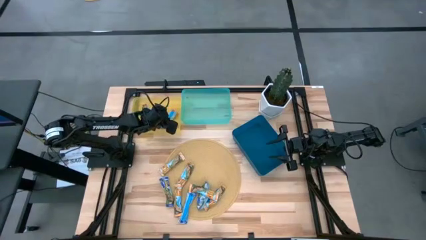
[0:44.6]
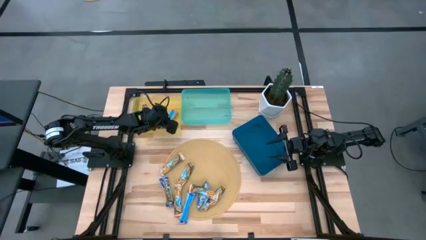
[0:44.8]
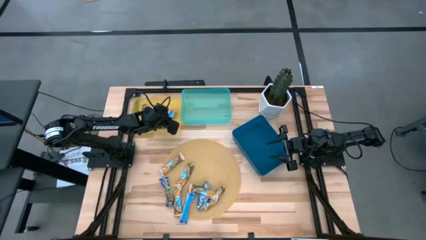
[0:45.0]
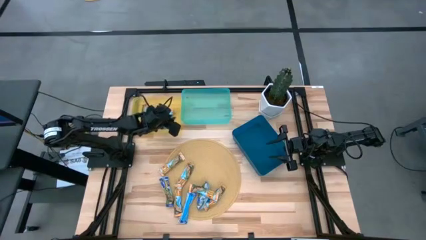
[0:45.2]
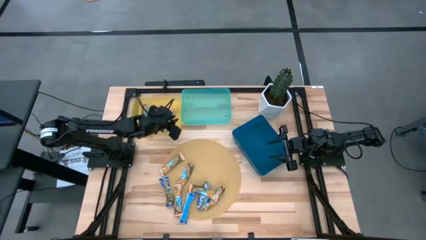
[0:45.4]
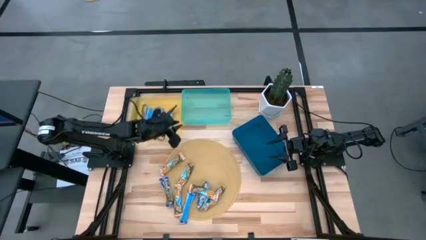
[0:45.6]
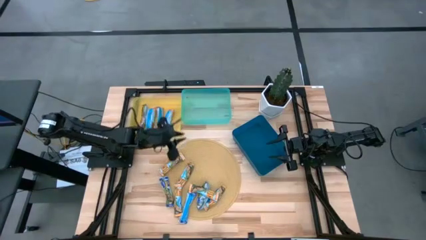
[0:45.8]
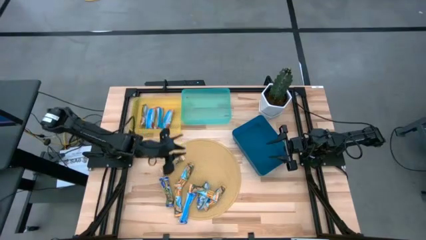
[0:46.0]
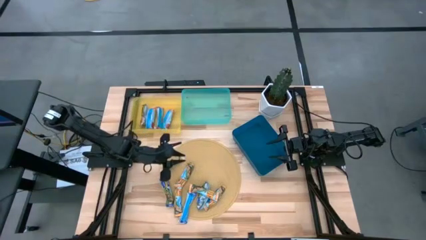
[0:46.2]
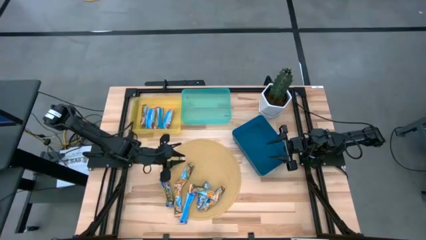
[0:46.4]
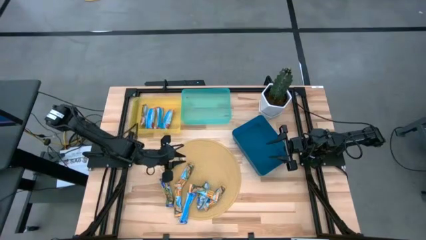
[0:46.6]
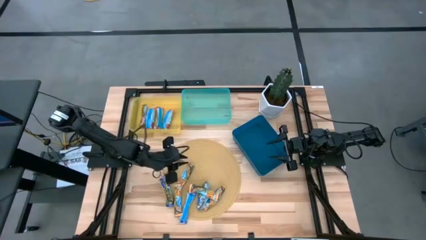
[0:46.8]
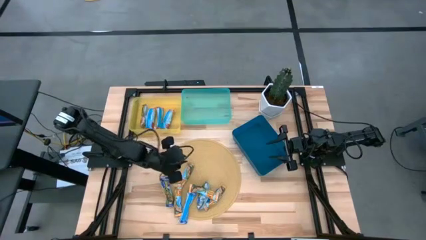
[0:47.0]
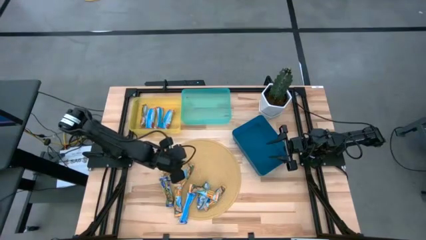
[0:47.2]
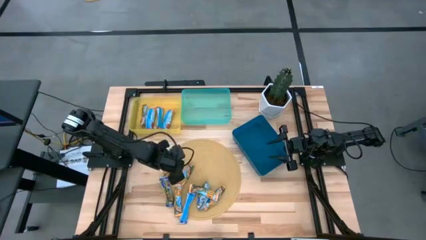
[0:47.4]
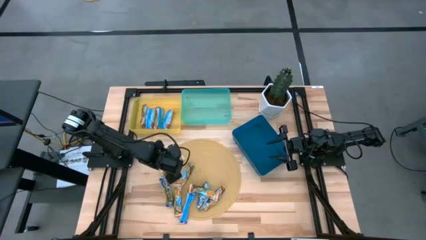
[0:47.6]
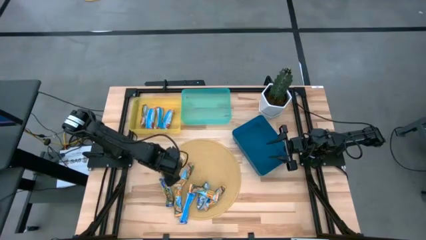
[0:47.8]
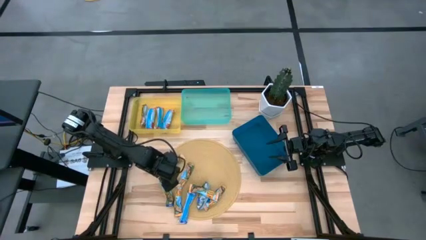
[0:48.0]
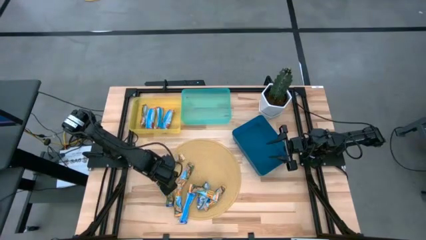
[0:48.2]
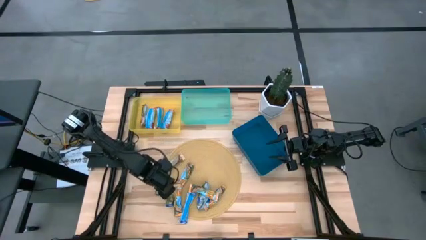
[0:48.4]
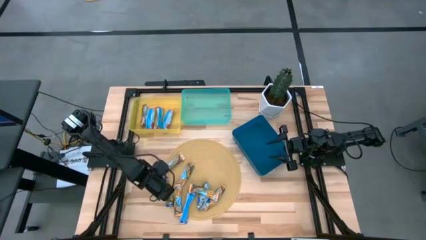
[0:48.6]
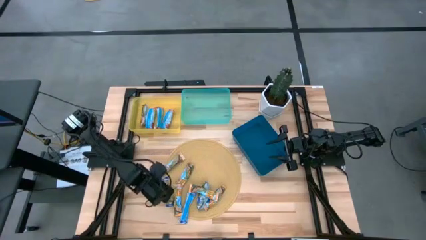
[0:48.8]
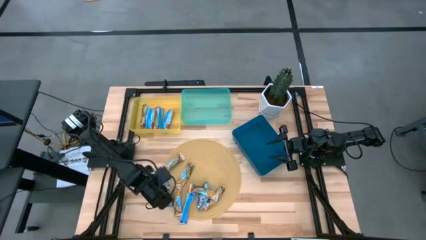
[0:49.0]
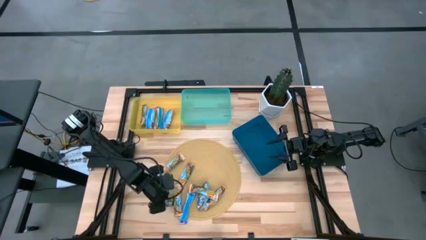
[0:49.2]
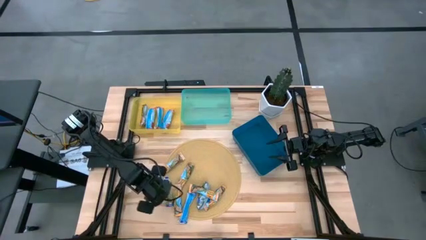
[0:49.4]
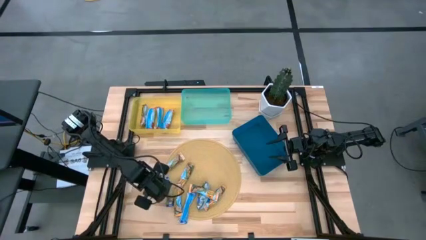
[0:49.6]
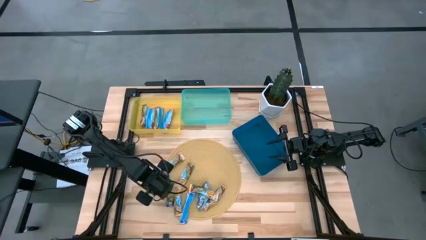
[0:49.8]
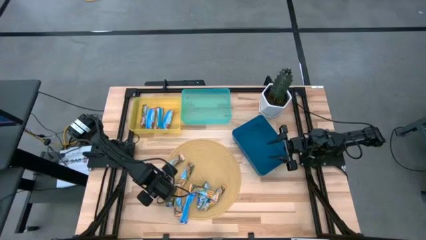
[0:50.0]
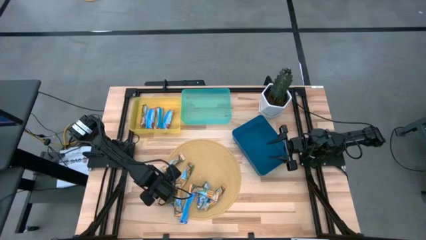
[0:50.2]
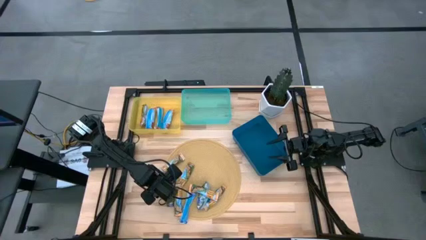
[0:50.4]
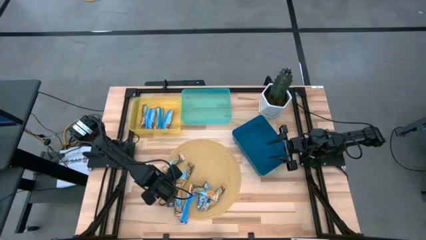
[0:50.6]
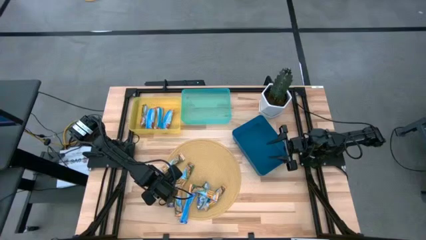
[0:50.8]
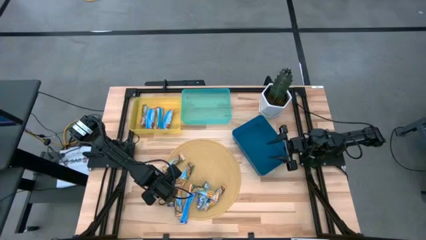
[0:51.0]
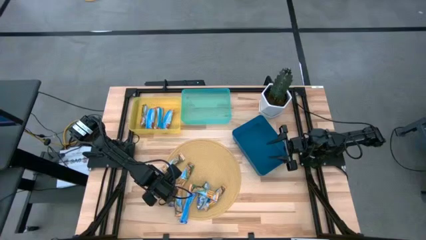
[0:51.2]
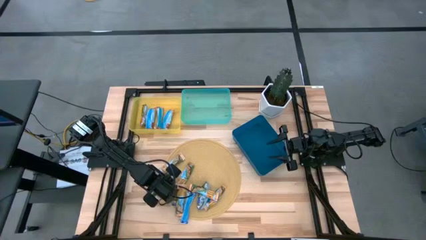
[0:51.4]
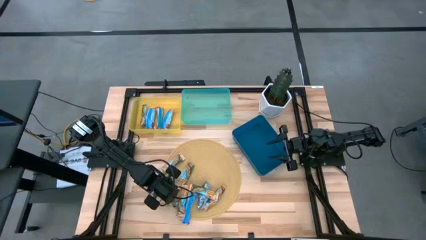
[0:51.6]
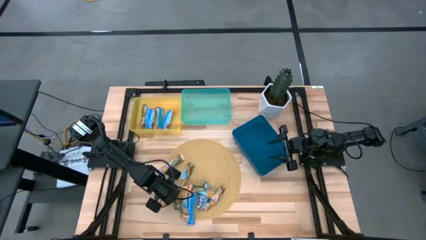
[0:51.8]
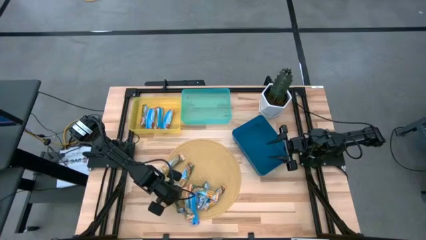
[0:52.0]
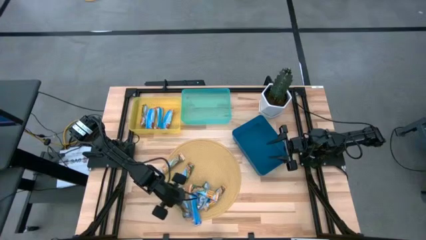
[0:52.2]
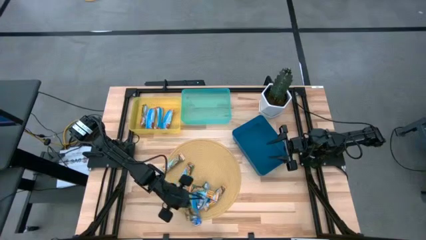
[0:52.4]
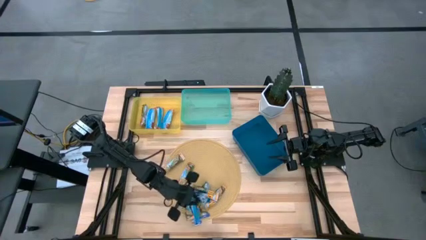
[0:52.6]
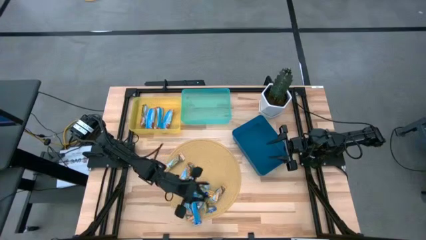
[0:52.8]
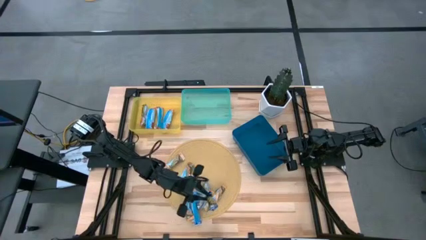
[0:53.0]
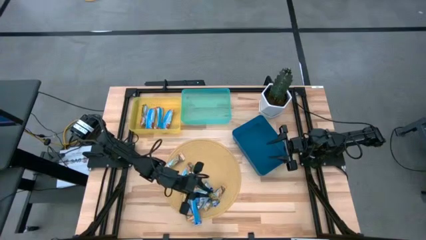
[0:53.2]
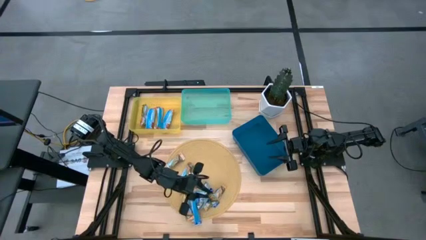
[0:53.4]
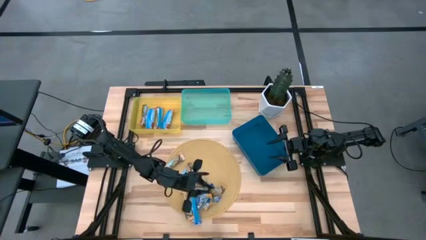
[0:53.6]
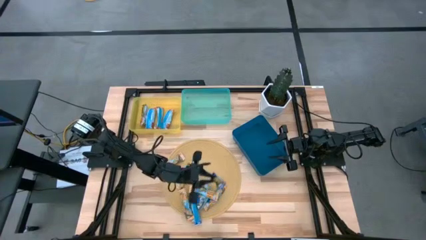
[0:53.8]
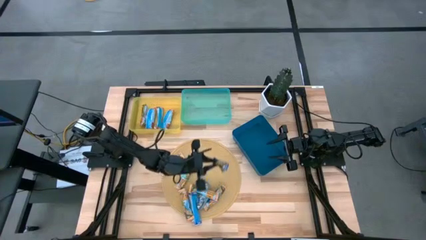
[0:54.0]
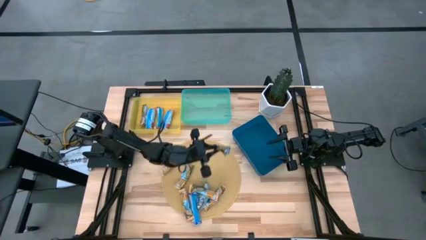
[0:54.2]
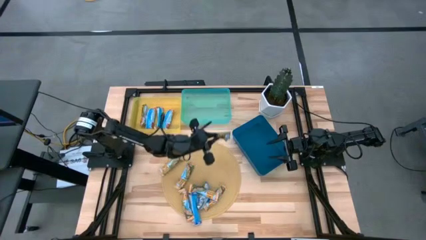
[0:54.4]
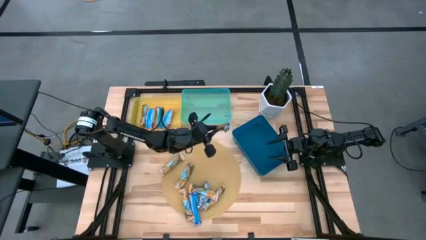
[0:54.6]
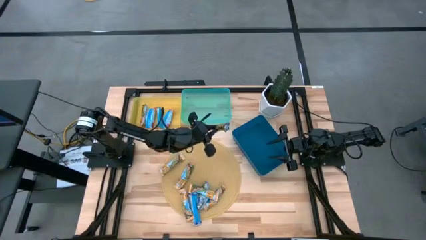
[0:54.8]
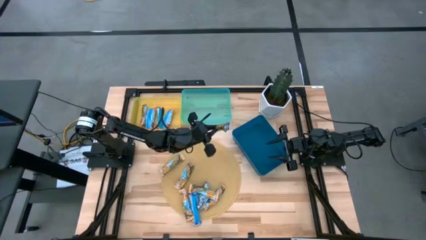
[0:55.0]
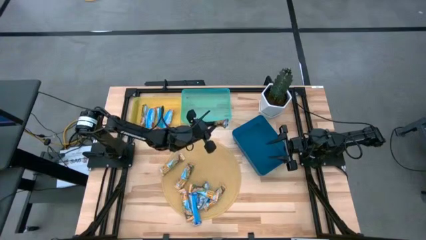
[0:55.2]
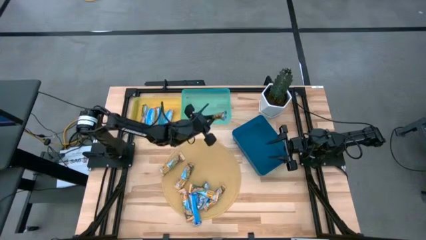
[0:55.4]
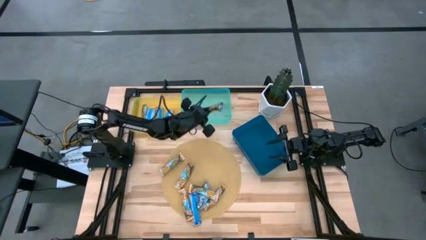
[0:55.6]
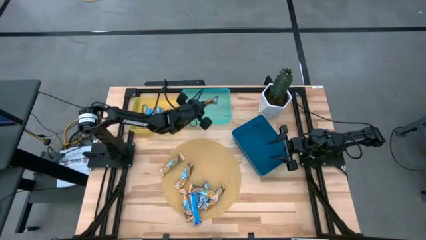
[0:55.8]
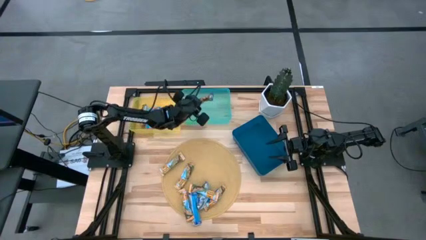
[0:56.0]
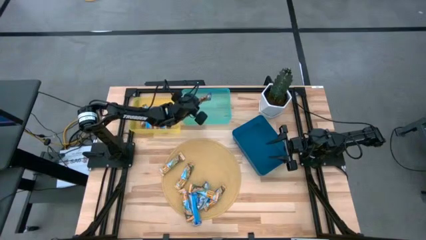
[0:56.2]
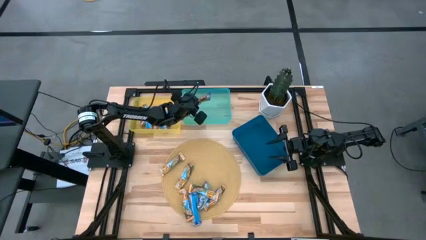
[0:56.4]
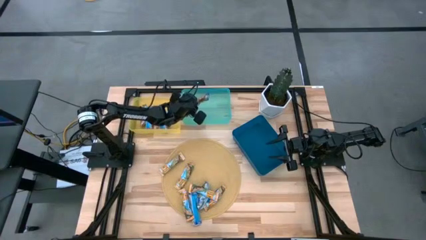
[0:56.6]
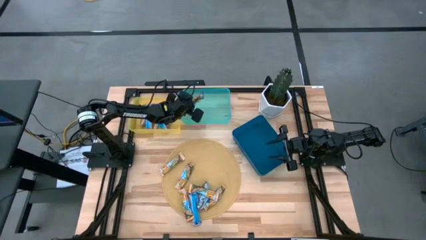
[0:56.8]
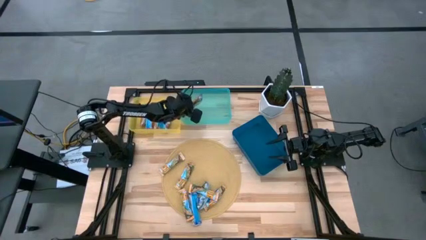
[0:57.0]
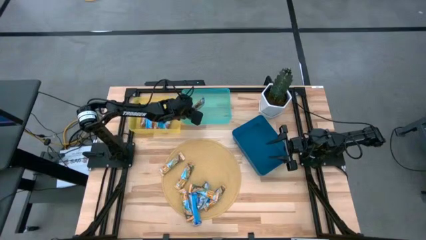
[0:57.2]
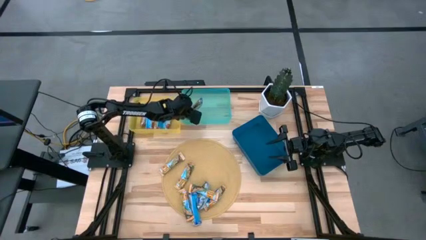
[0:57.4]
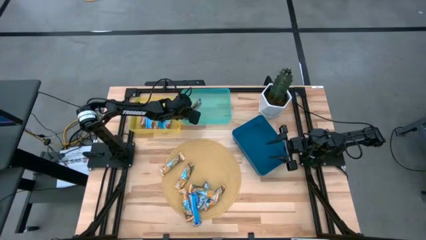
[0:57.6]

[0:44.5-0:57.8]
Task: Pick and place Granola Bars by type
Put the left blue granola bar into the light blue bin
